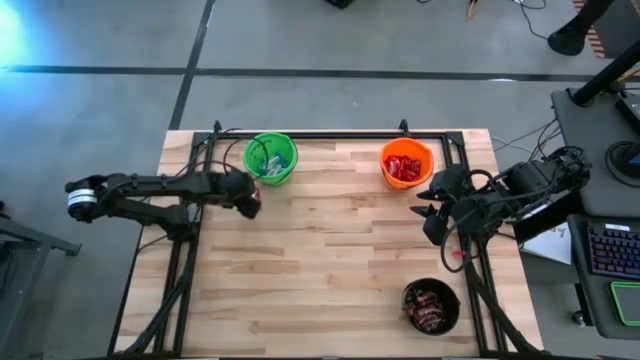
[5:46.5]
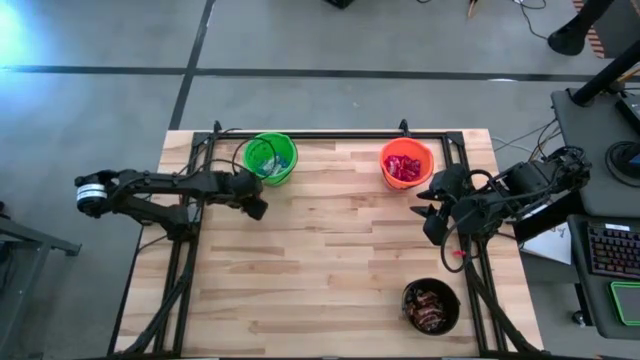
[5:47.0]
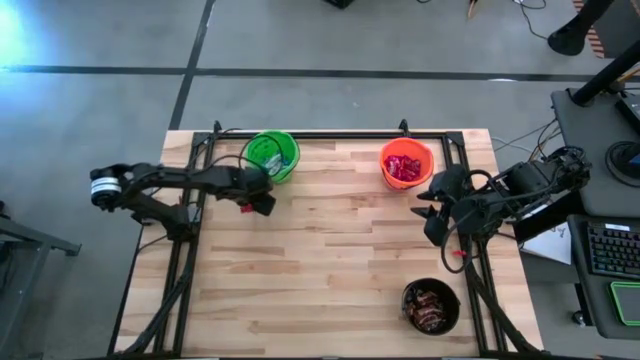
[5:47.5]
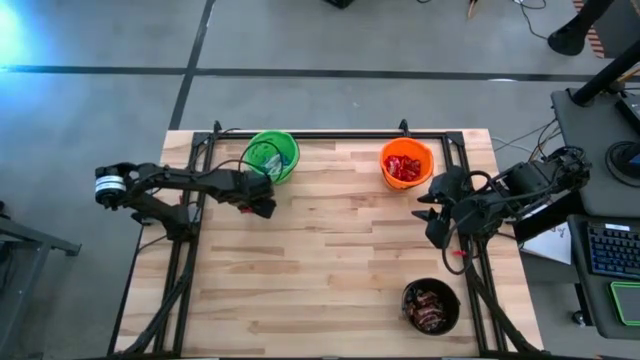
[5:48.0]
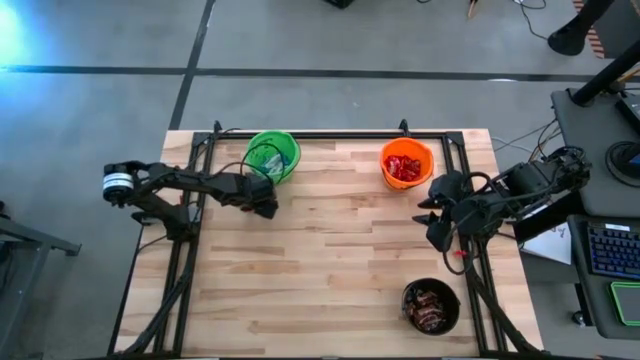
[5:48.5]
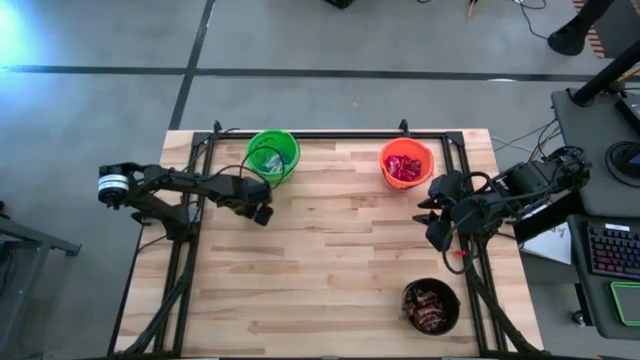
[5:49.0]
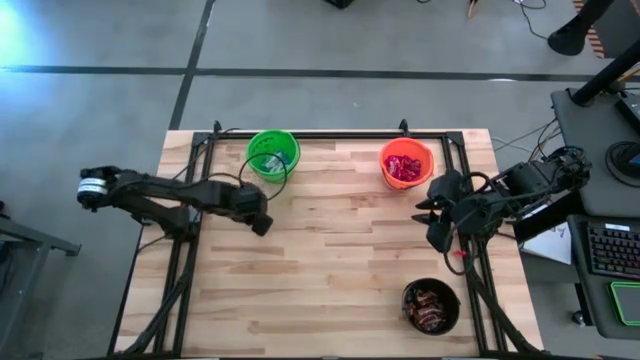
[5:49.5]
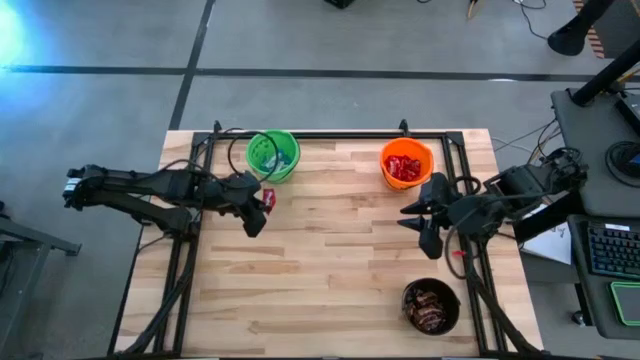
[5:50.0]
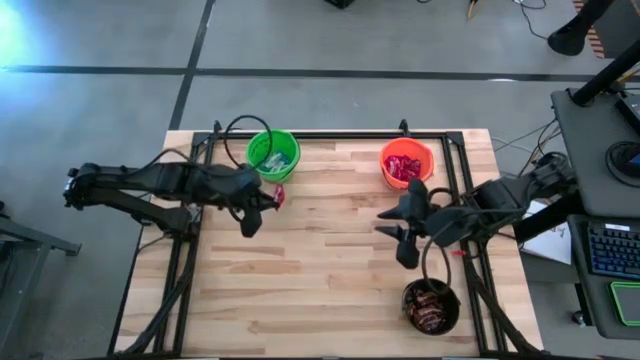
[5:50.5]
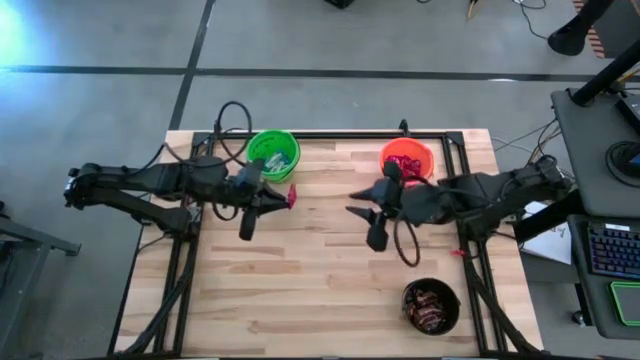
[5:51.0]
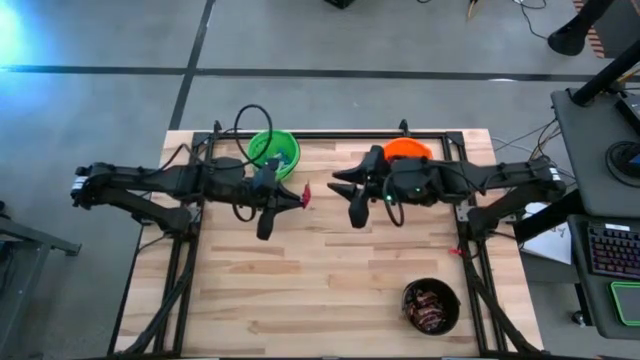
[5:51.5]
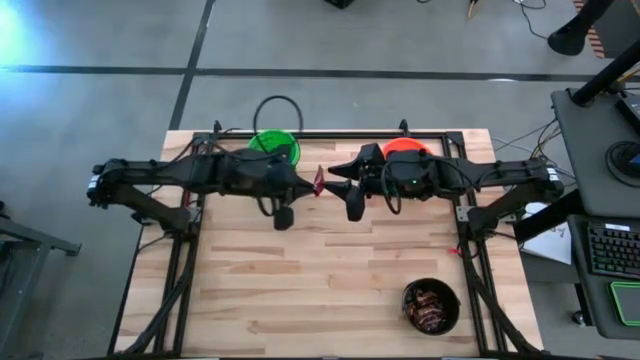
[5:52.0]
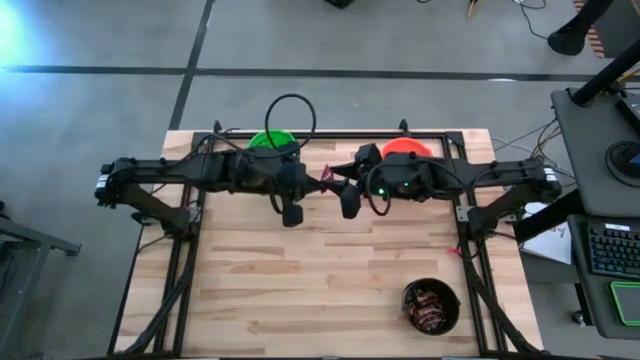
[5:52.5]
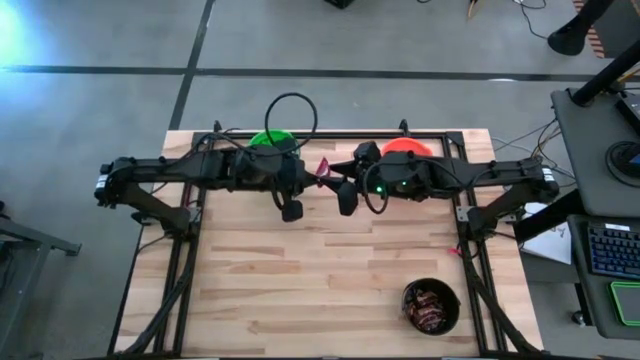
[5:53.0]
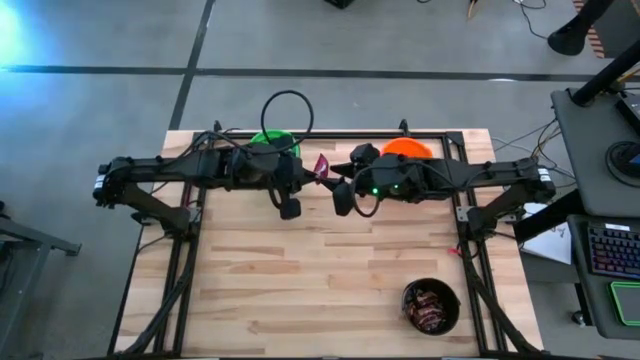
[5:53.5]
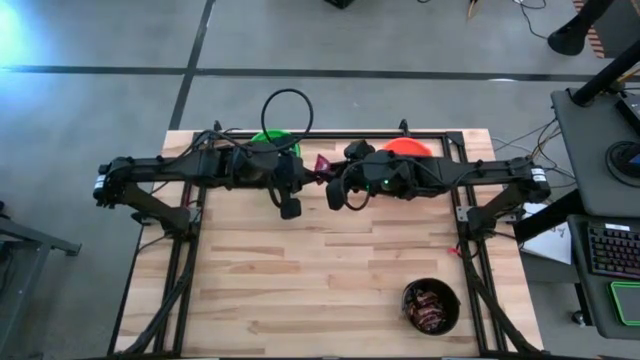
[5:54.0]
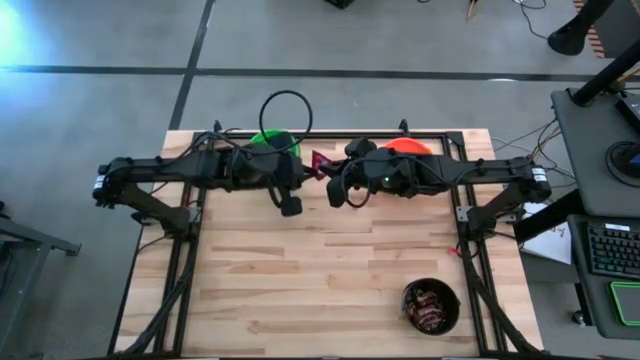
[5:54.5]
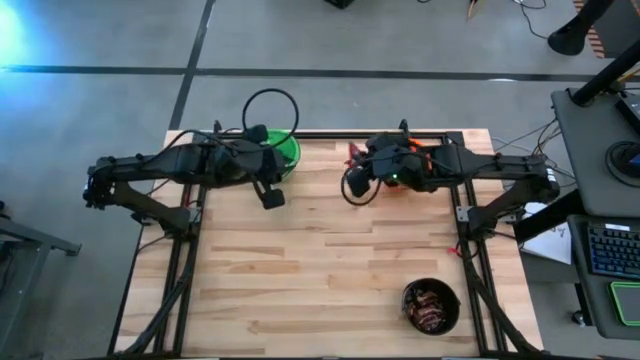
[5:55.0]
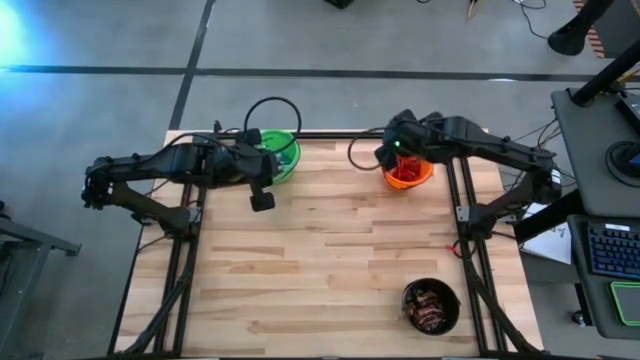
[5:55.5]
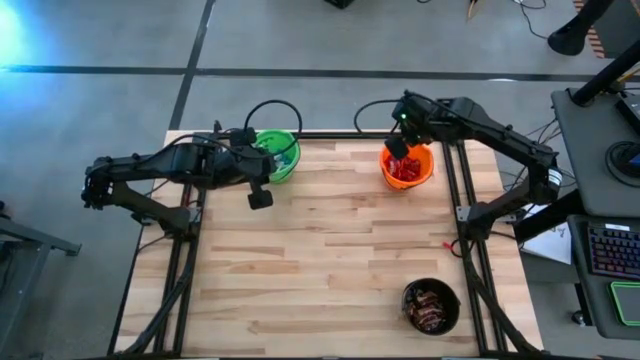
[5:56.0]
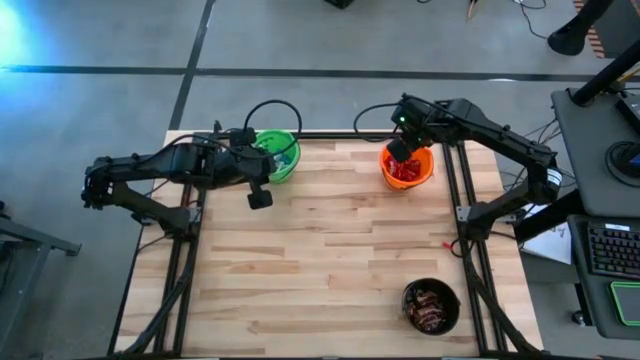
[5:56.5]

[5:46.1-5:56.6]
Task: Sort candy
Put the red candy into the orange bucket

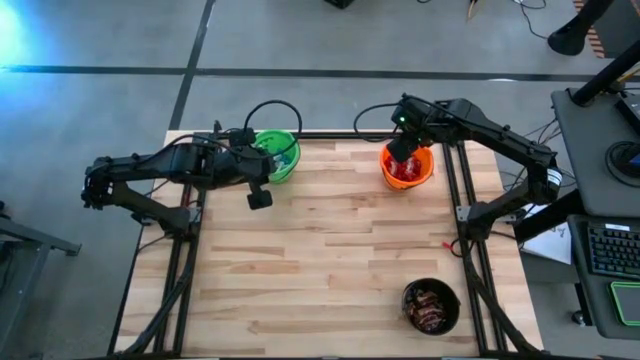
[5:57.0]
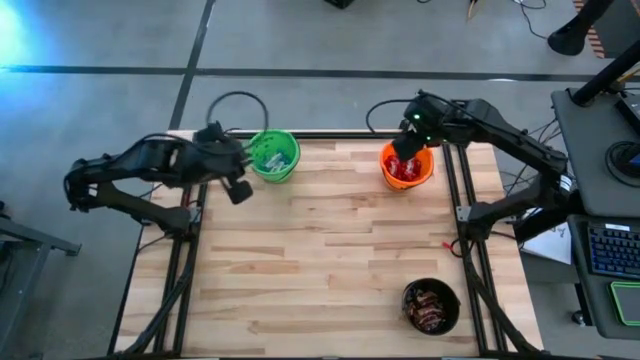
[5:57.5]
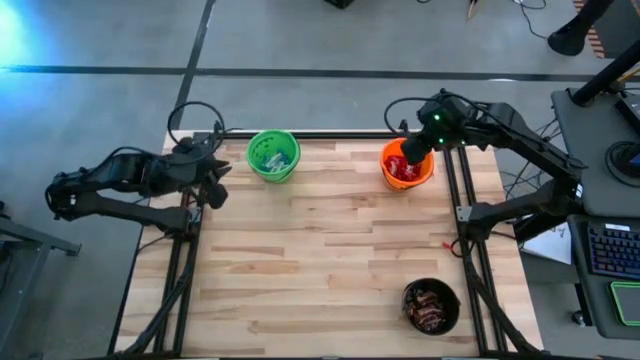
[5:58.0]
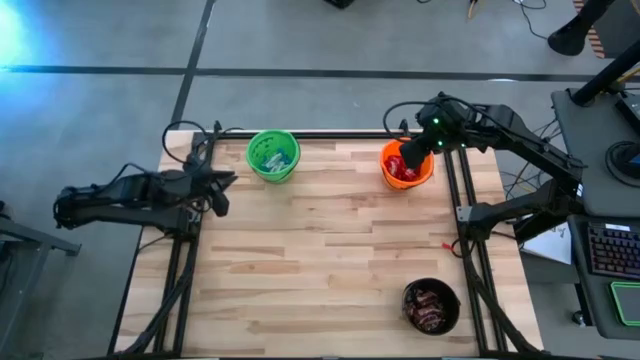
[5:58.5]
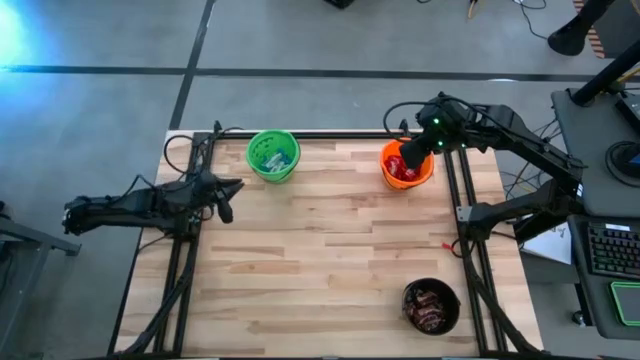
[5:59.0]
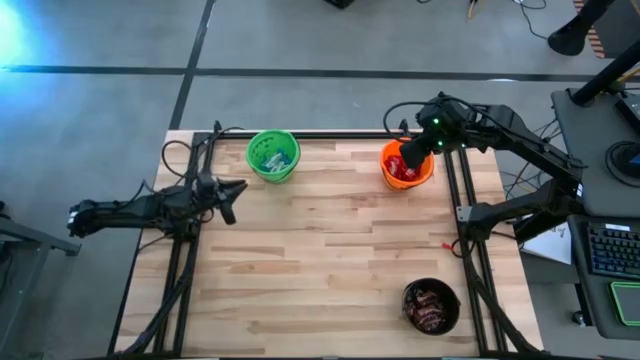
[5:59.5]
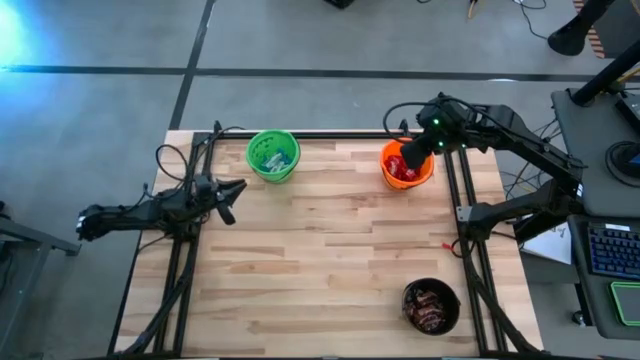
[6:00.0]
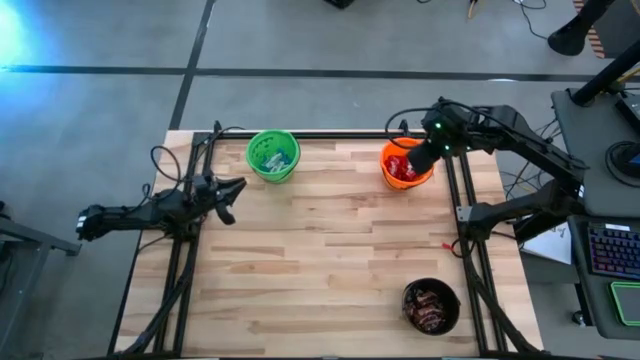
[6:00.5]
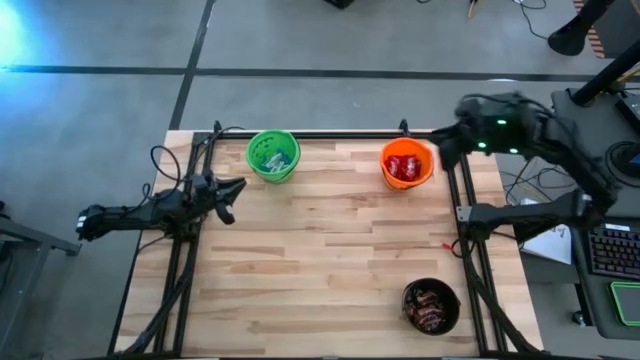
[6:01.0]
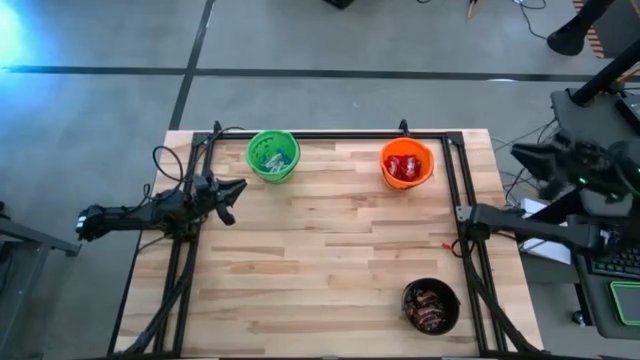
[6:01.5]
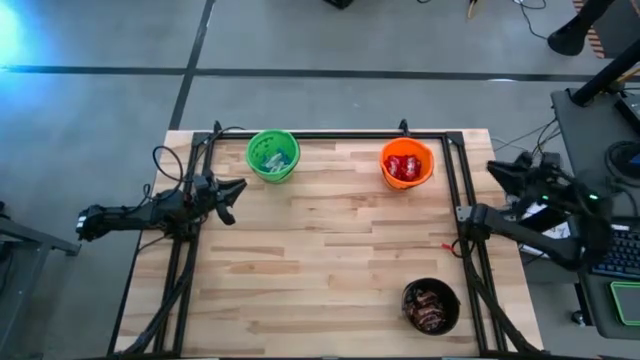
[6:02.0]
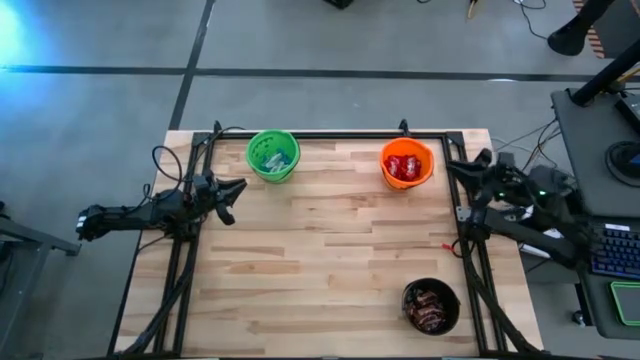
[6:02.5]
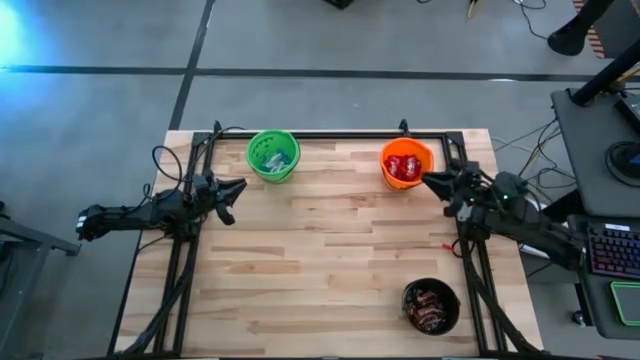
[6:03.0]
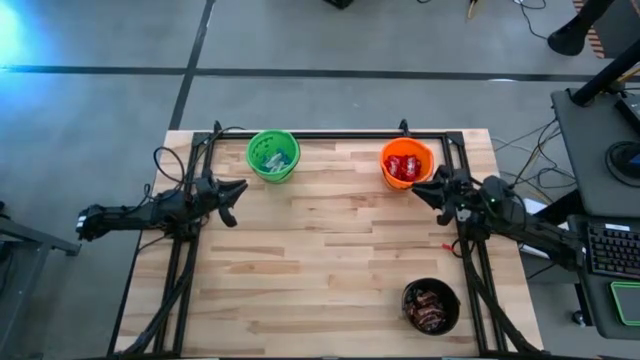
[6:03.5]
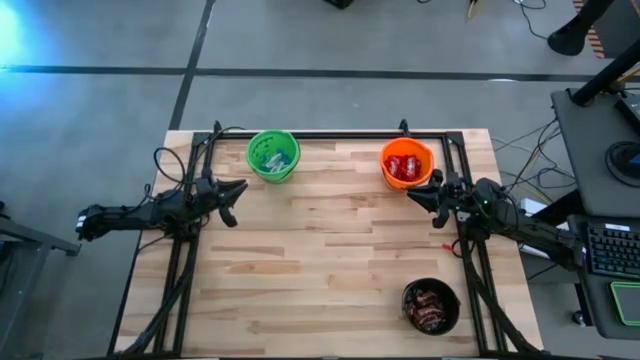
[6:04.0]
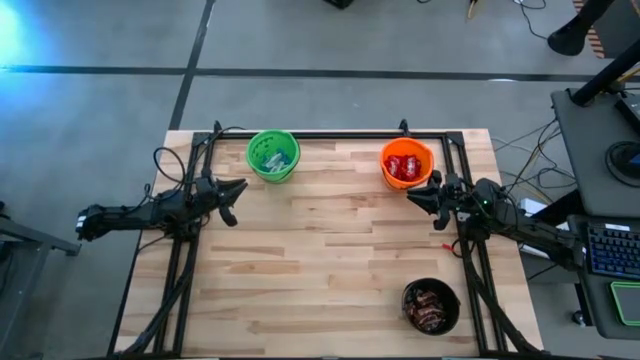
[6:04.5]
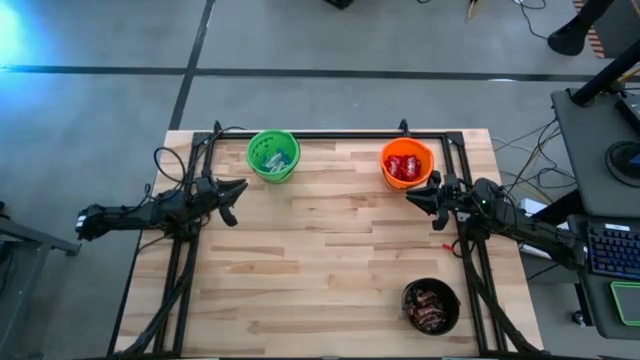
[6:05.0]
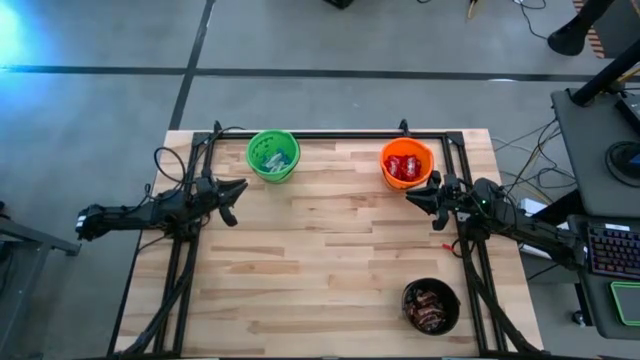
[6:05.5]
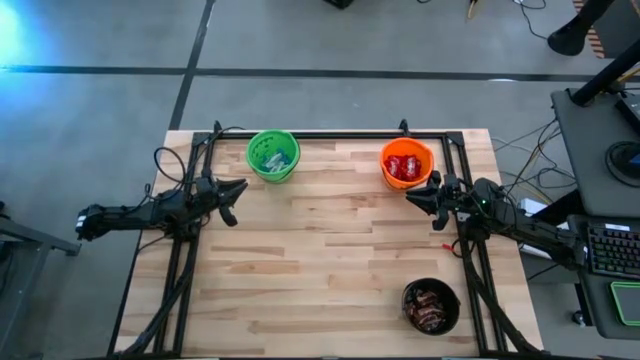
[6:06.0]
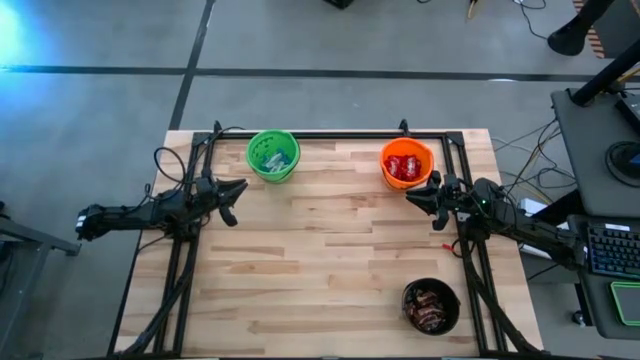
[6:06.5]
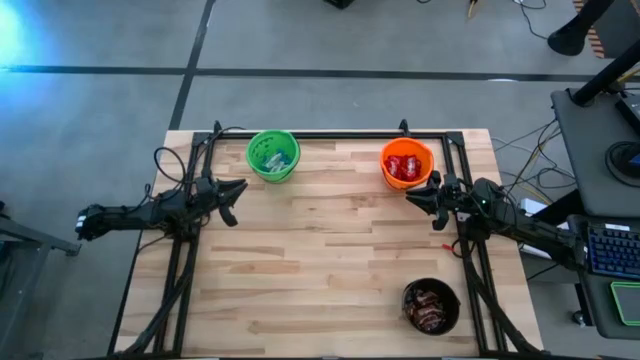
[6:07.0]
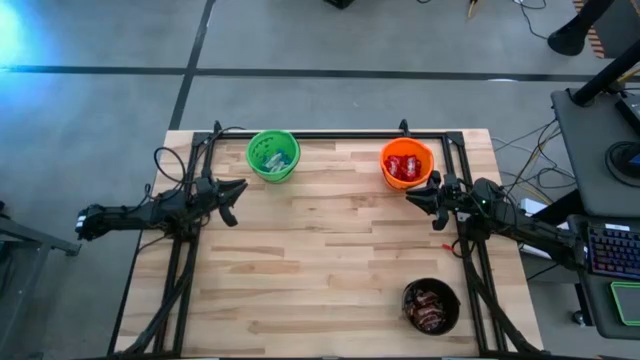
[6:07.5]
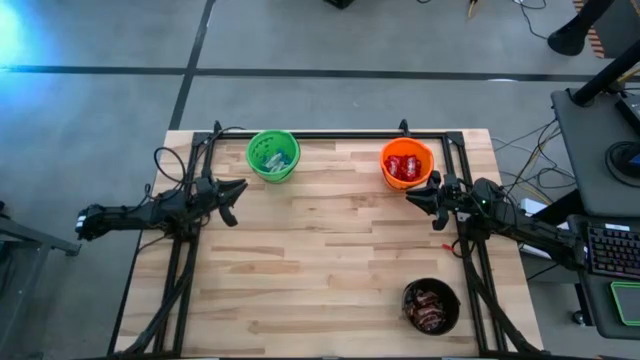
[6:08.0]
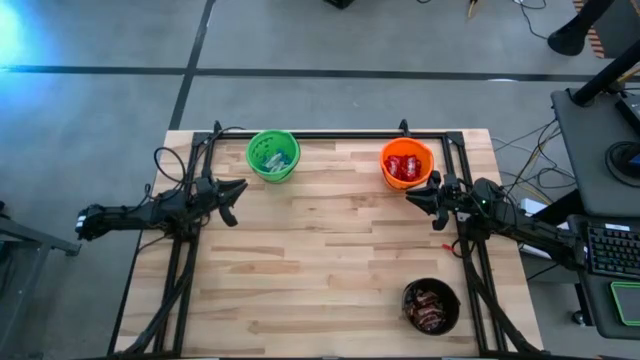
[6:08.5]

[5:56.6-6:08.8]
Return to Home Position
